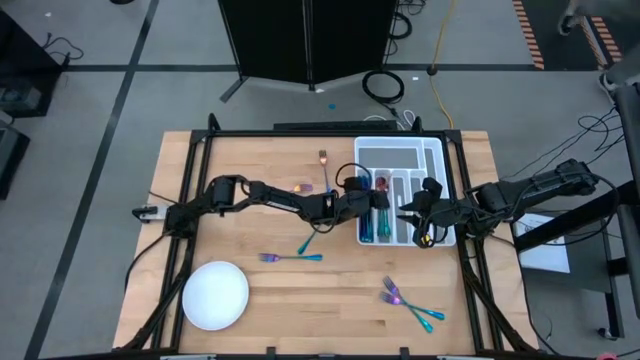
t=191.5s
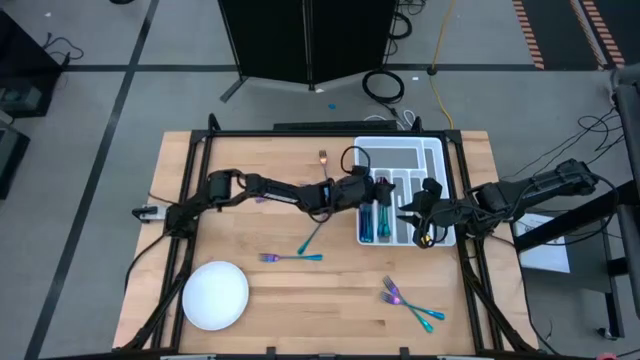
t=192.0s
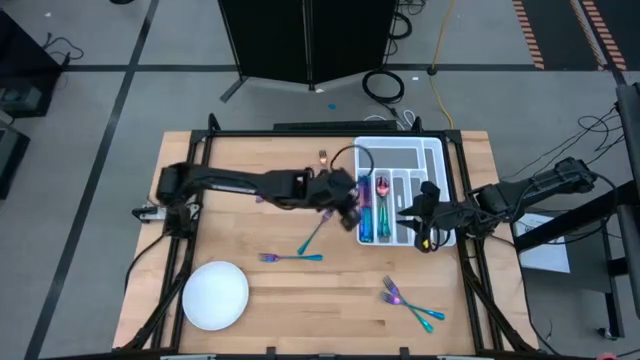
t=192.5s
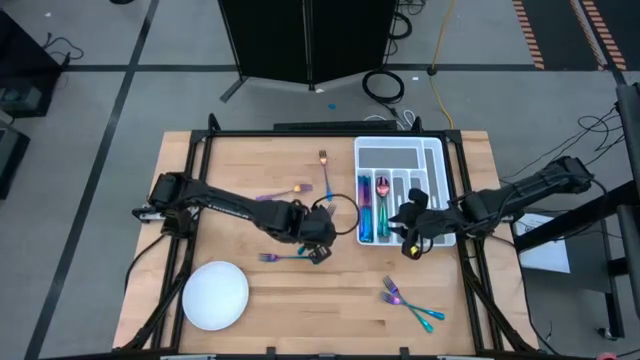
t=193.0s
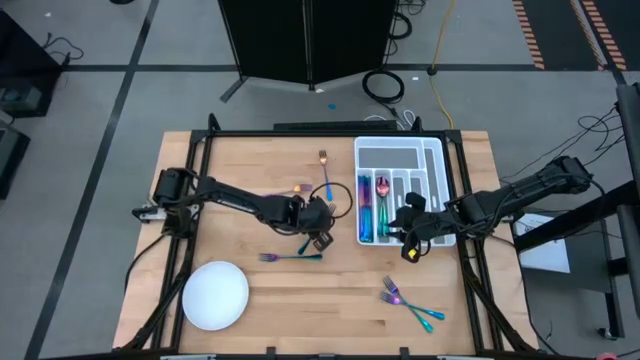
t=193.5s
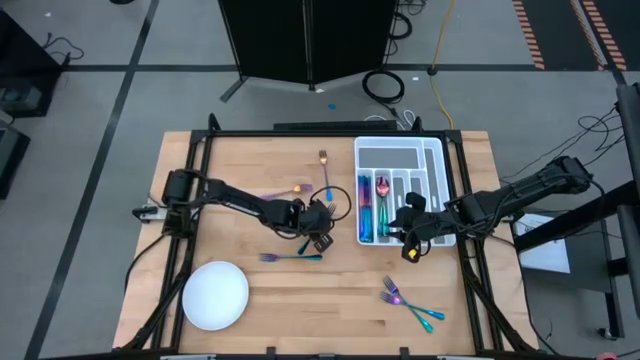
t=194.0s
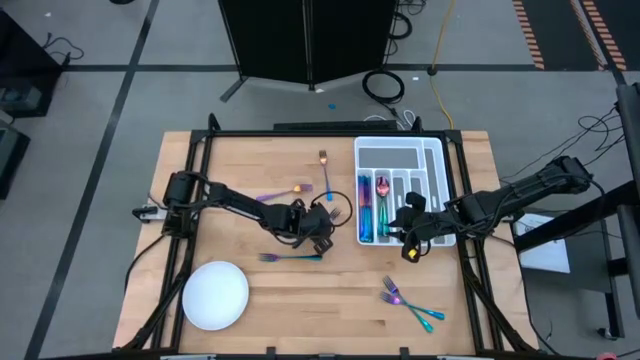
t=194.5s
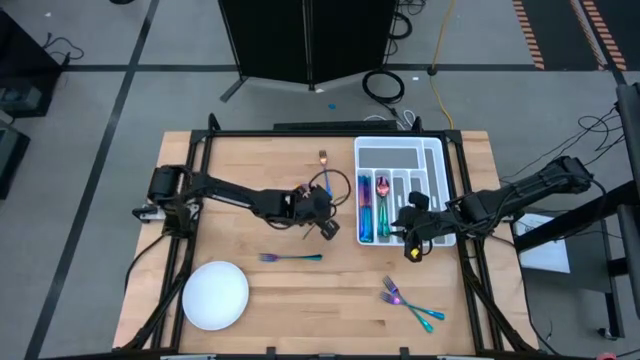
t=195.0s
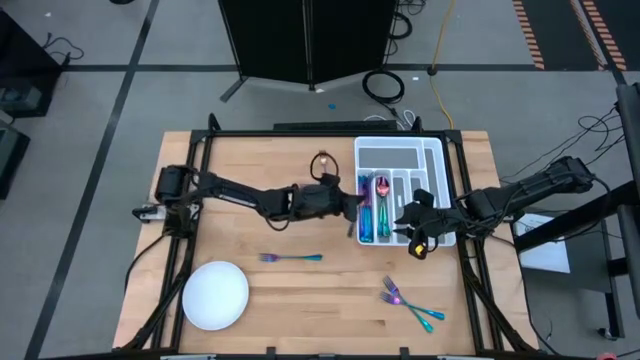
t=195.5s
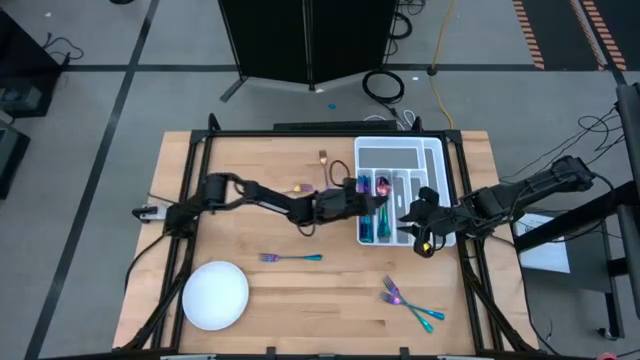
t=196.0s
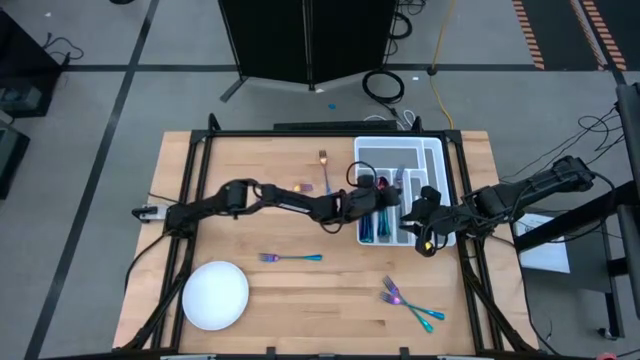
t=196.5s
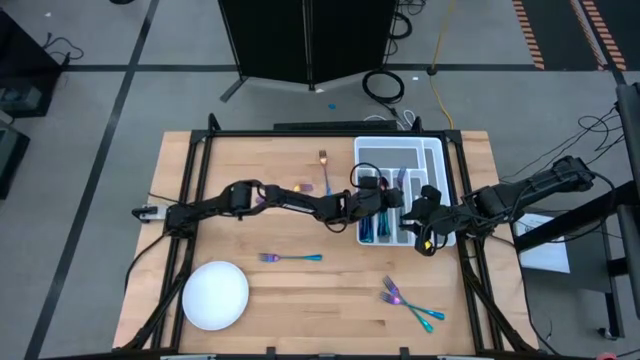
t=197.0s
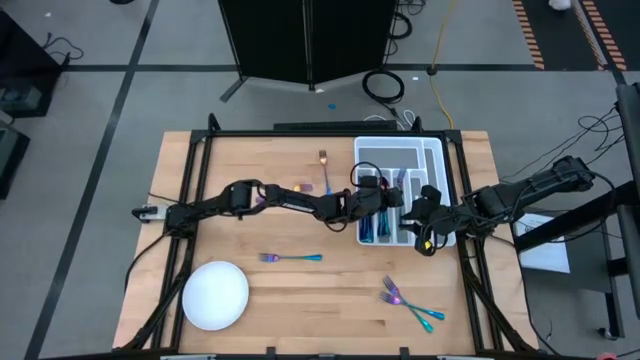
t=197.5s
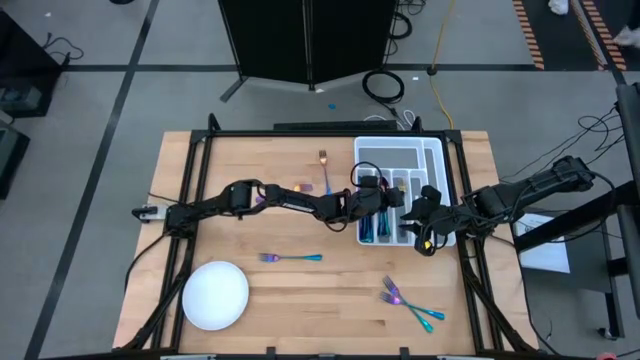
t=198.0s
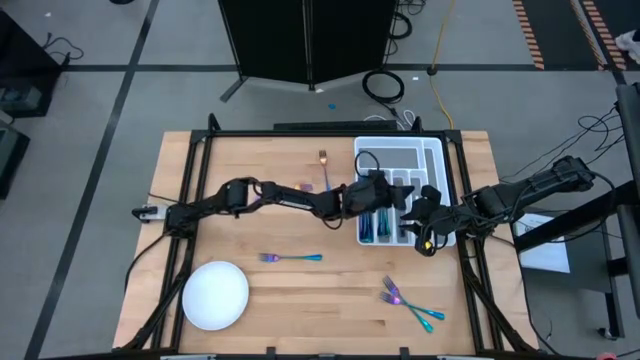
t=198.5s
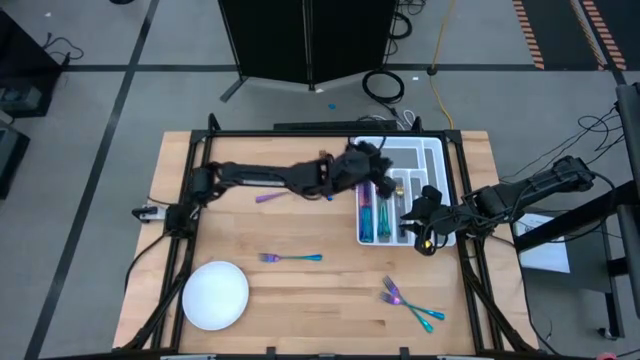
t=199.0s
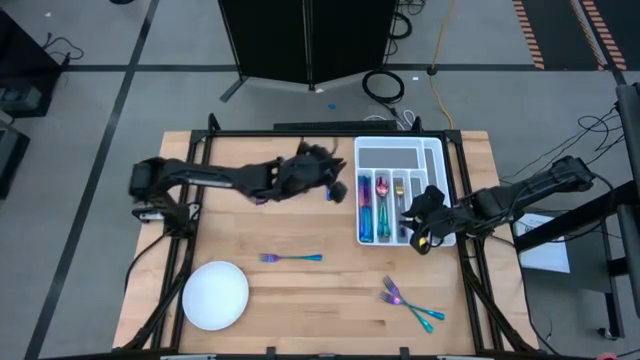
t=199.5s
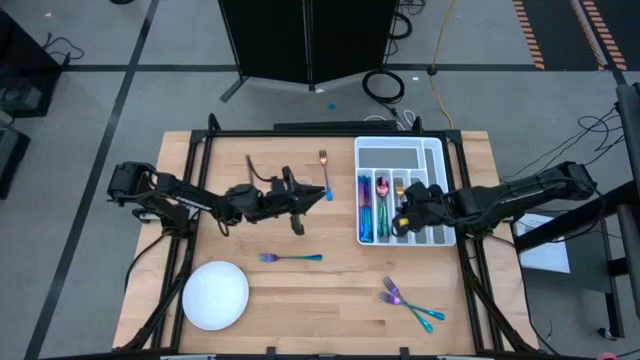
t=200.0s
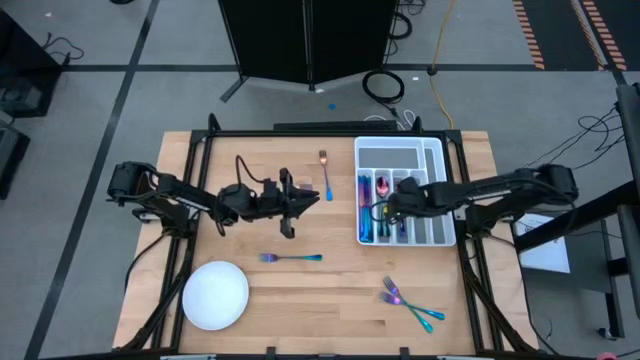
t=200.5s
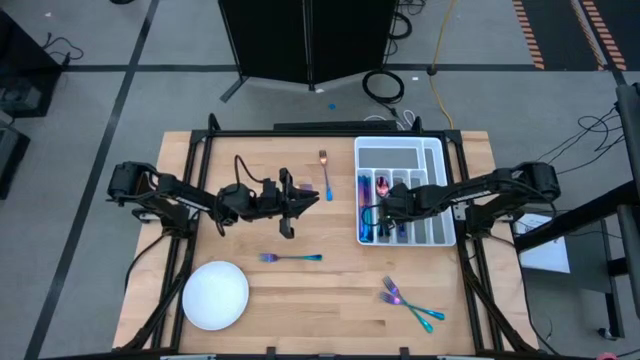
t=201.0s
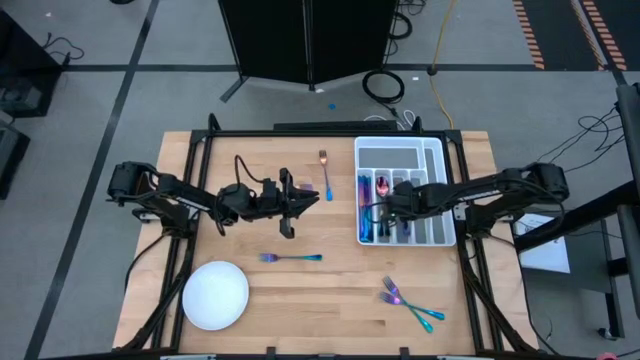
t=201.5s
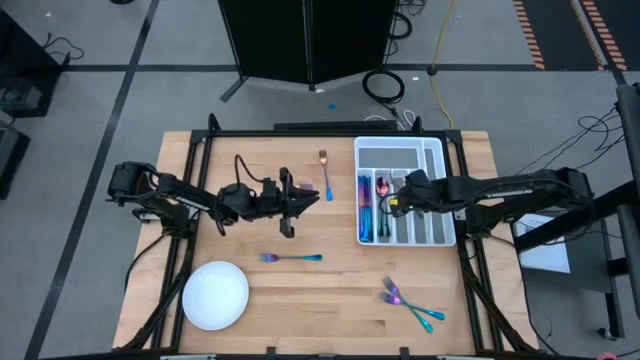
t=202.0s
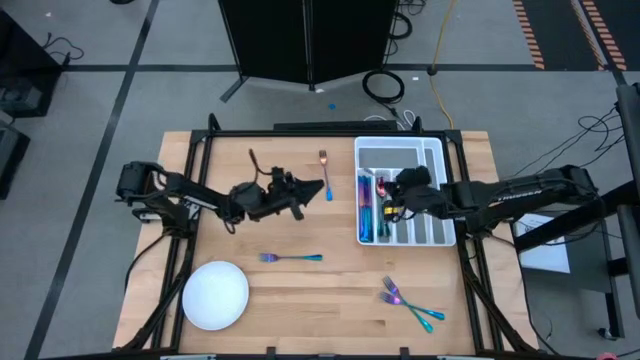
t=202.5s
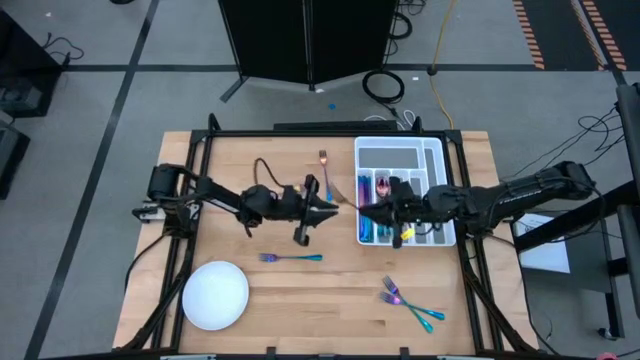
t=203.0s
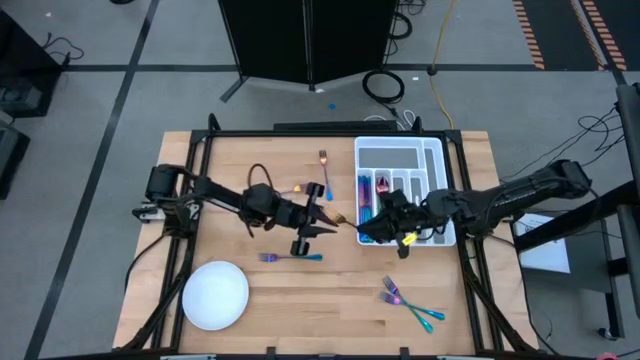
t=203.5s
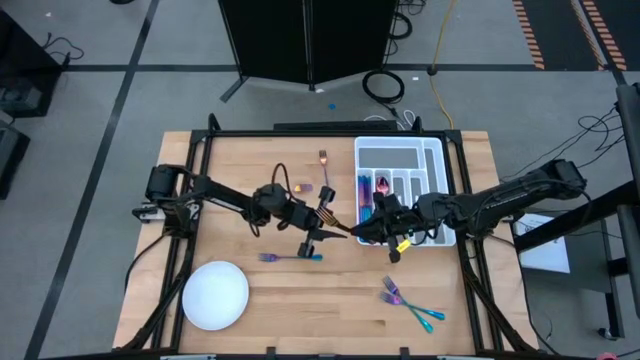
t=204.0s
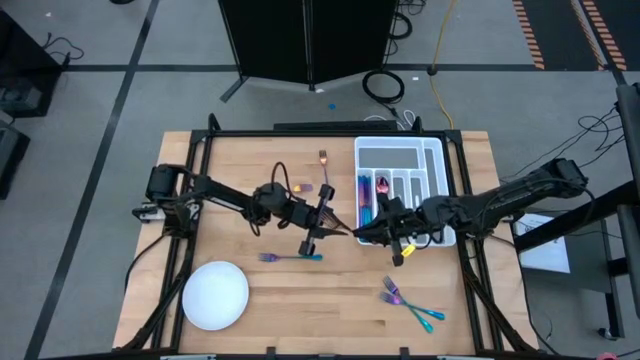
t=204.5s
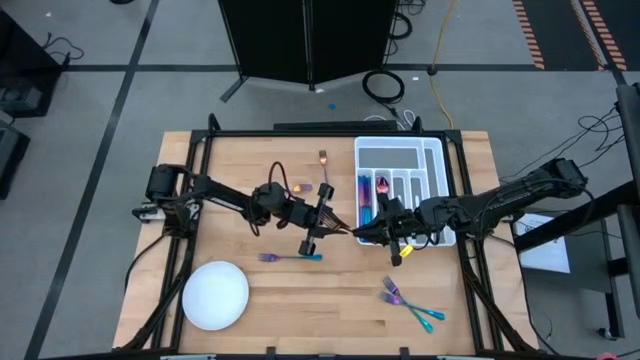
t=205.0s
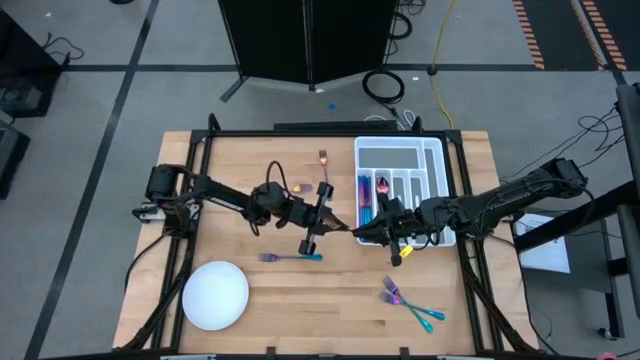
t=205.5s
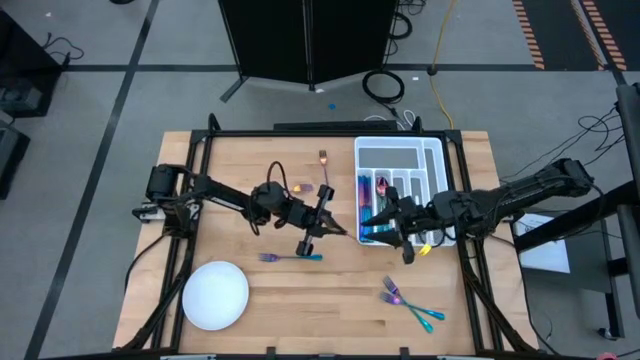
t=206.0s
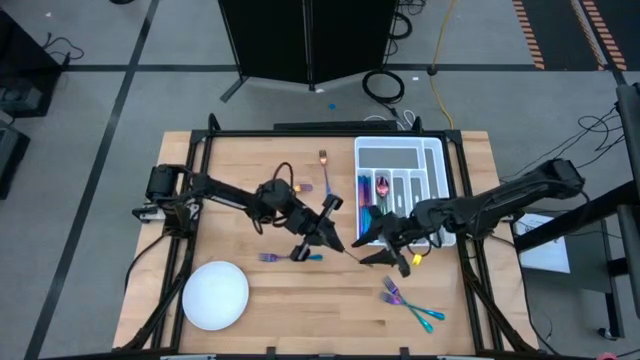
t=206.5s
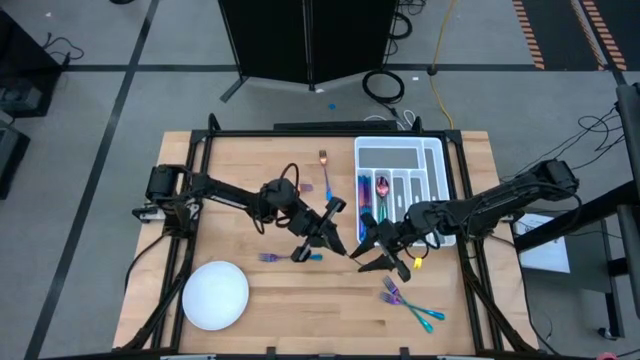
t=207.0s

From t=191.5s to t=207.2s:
Task: Sort silverware
Put the blue fork into the utensil organizer

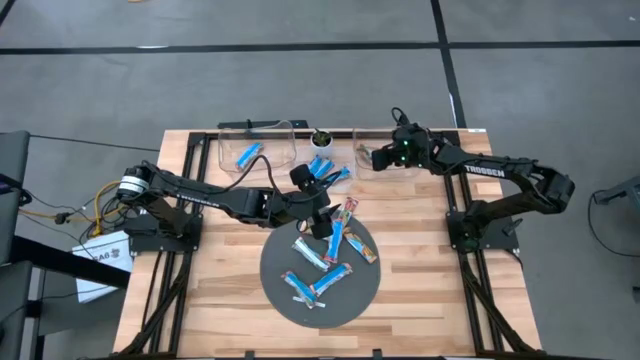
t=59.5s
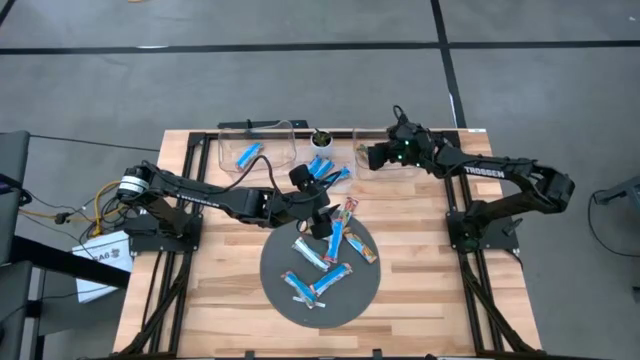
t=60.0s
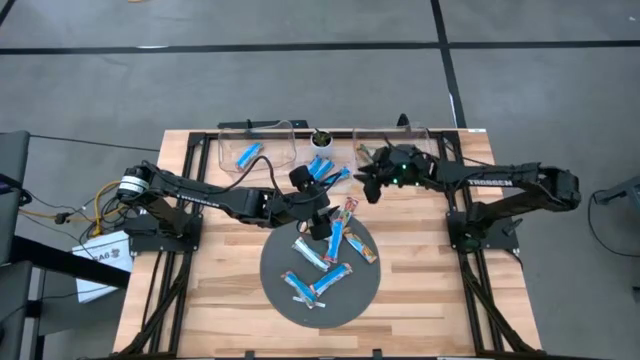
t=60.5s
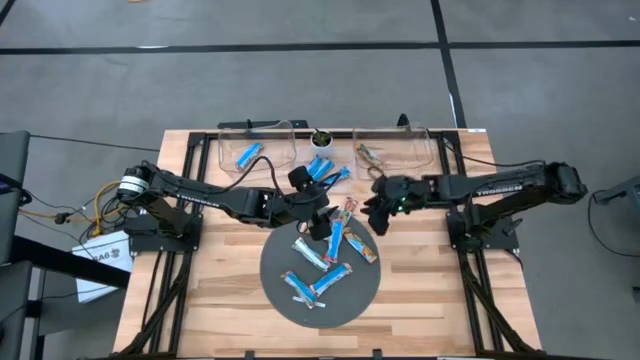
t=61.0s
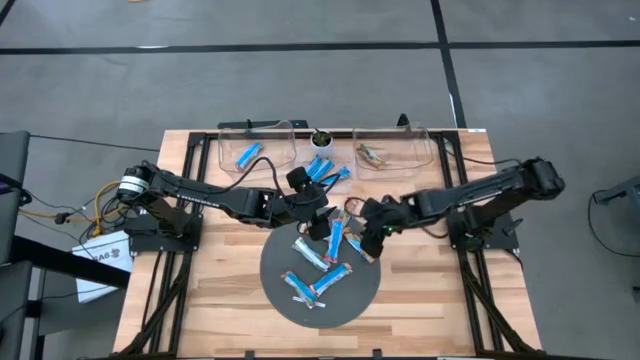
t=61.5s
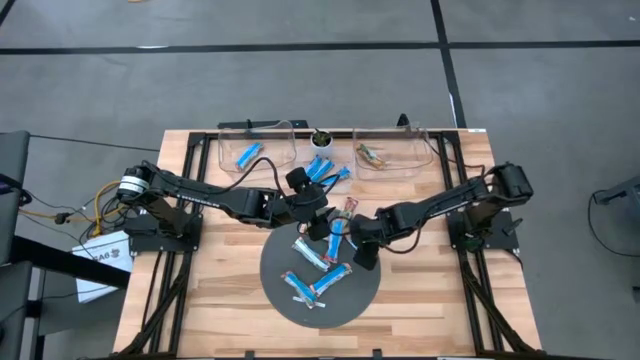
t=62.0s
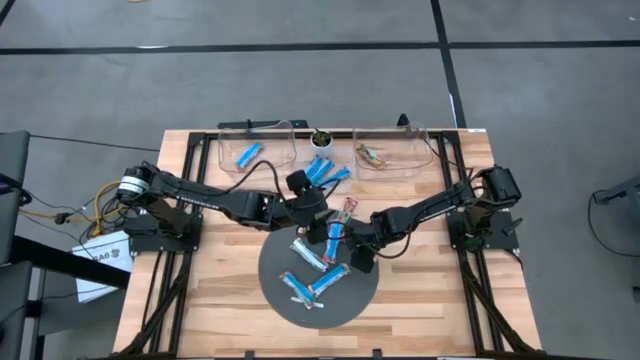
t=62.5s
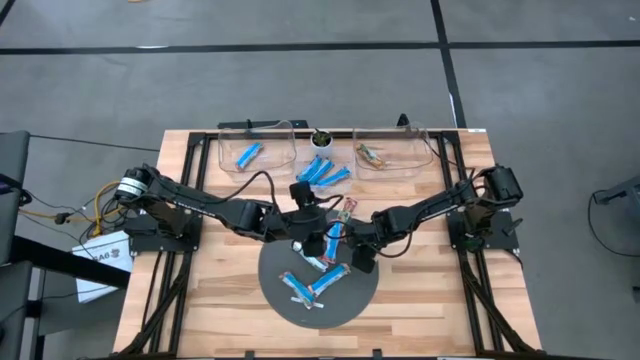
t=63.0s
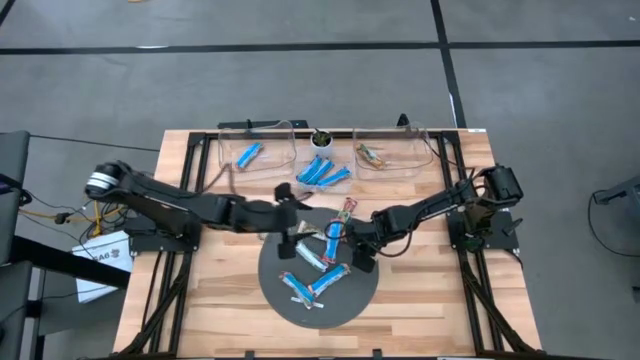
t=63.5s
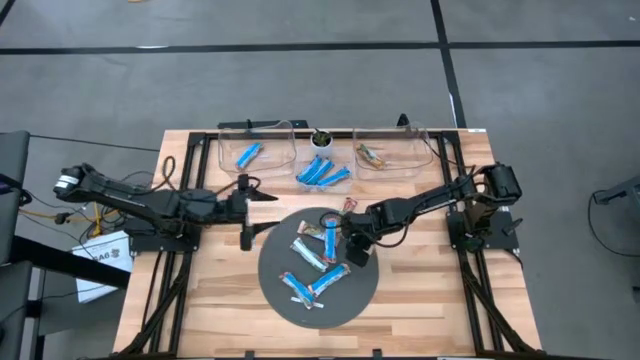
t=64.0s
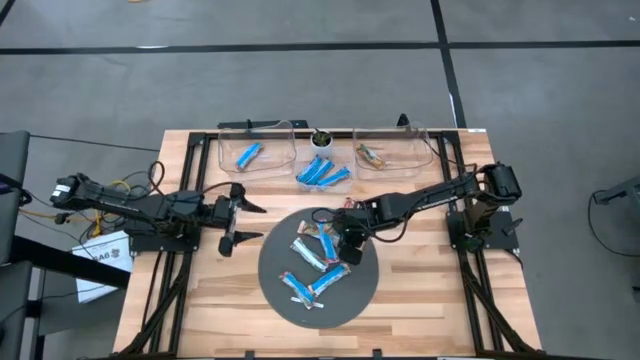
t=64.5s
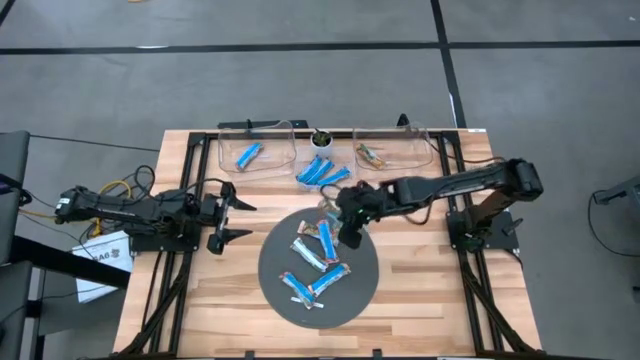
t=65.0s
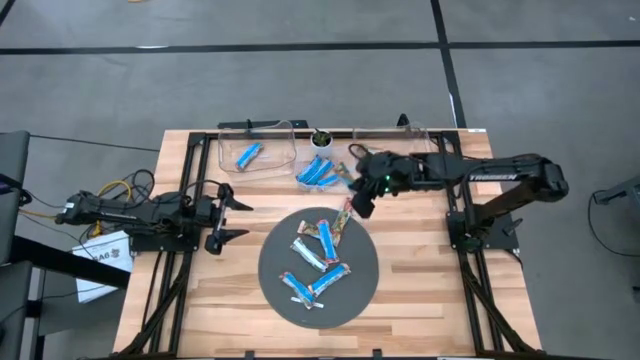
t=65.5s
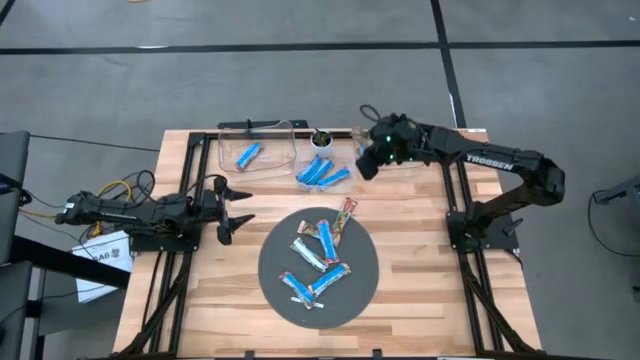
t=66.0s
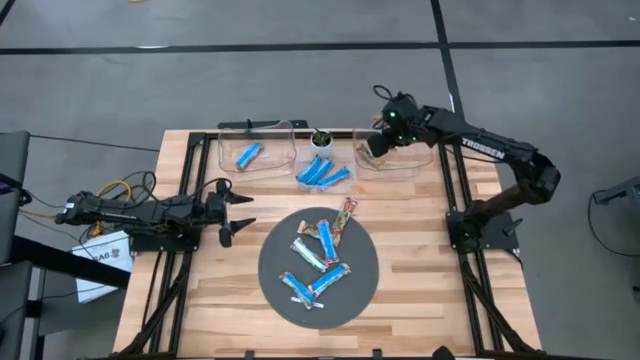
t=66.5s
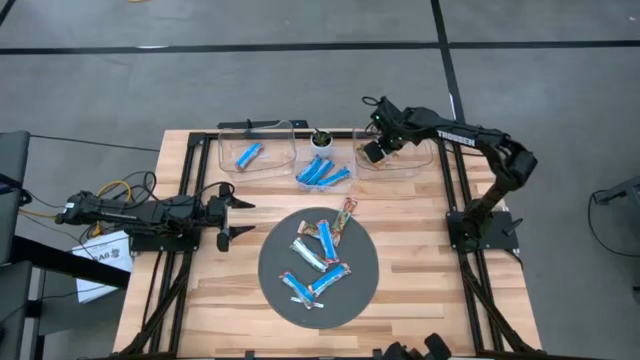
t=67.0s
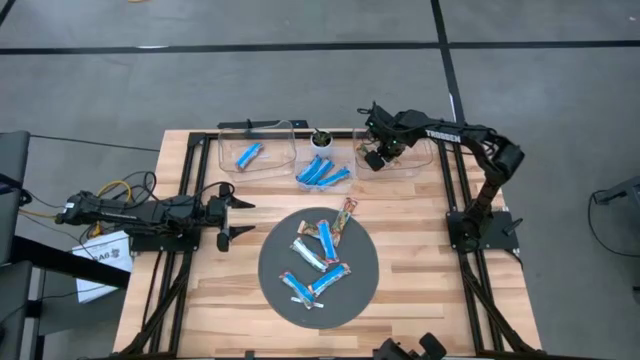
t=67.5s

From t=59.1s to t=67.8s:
Task: Pick and place Granola Bars by type
Put the yellow granola bar into the right transparent bin
